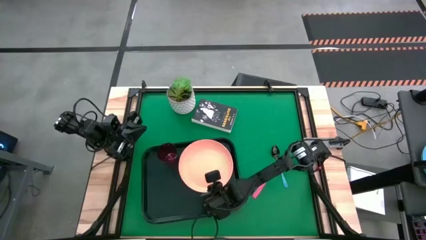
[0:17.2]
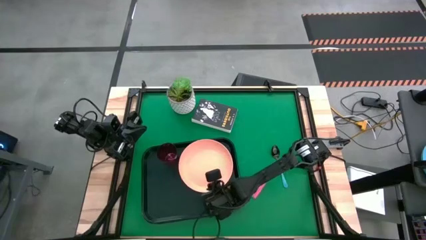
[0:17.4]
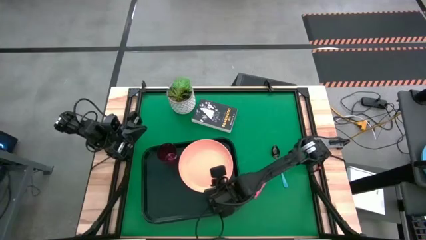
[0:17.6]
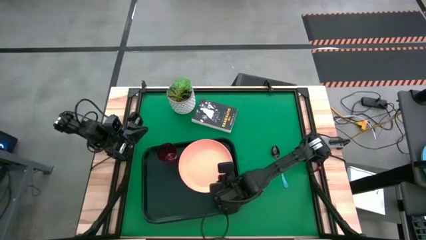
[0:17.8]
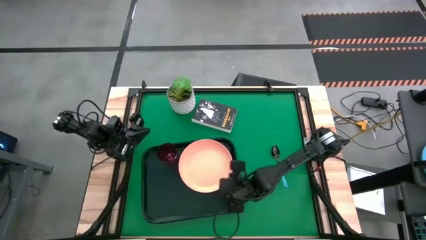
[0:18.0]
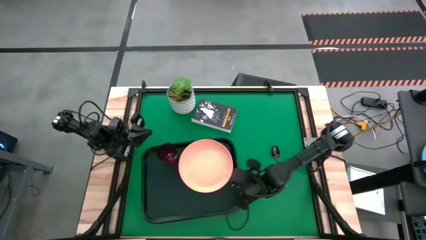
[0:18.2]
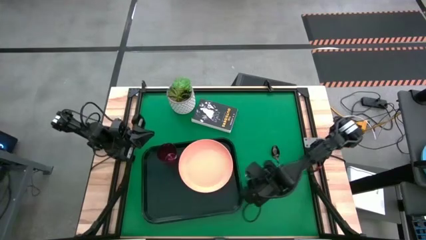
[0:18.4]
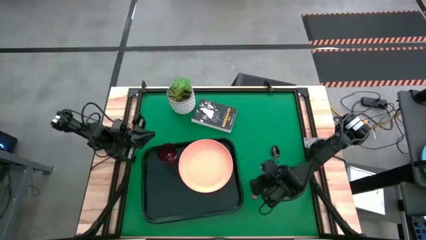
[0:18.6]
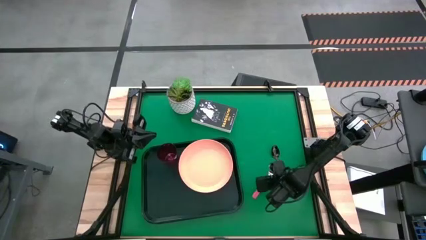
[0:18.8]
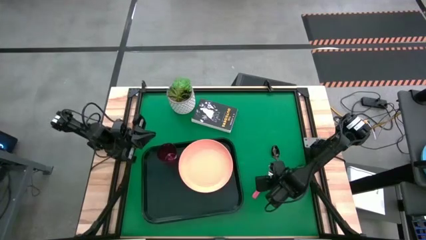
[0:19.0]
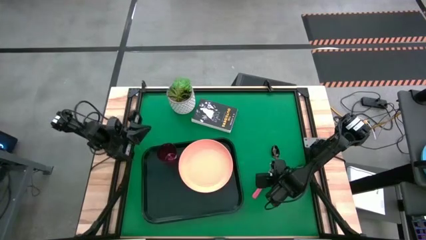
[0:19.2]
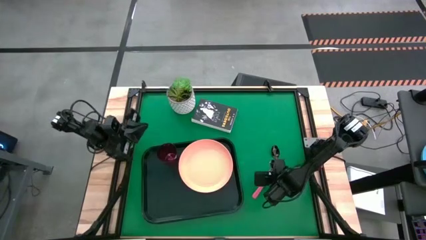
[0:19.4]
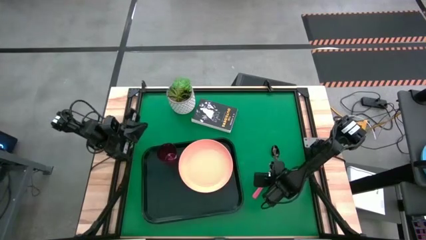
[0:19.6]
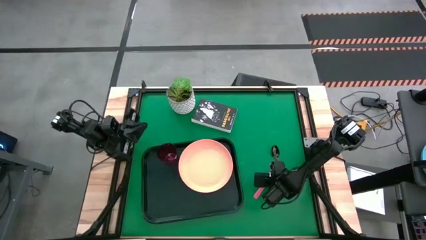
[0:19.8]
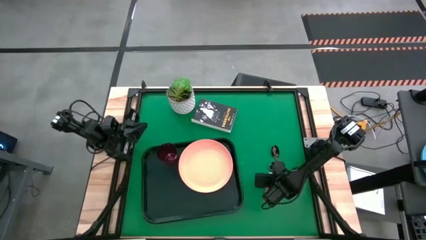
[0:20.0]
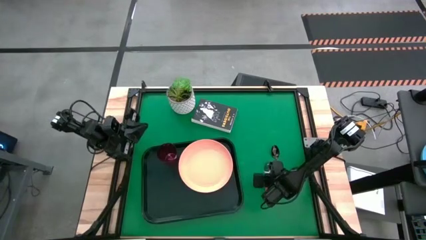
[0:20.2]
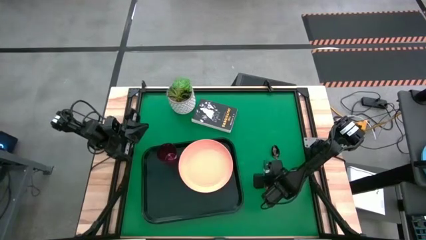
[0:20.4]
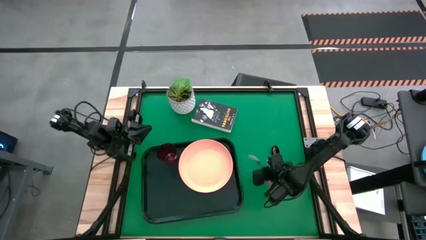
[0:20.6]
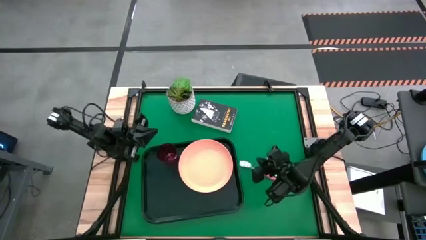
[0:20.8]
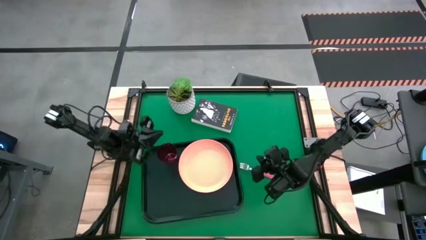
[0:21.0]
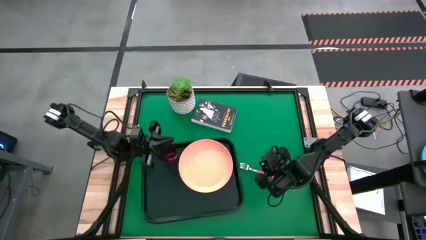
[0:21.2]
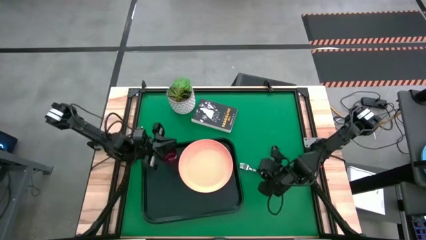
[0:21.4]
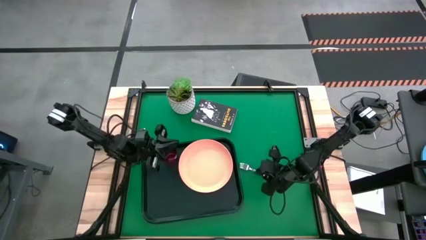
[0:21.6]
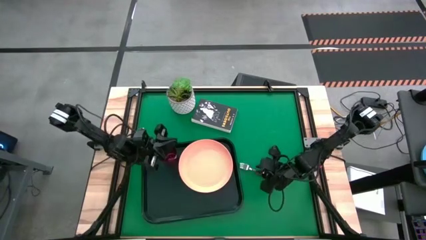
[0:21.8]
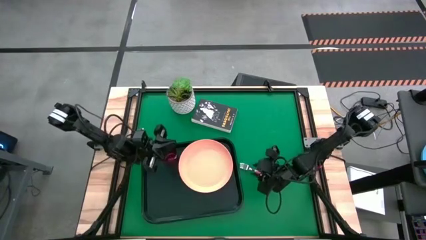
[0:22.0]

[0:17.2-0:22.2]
Task: Pick and place plate/cup/fork/spoon on tray
Put the red fork on the black table tray to the left of the orange plate

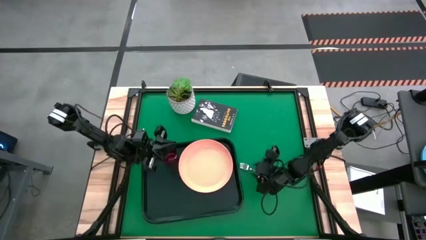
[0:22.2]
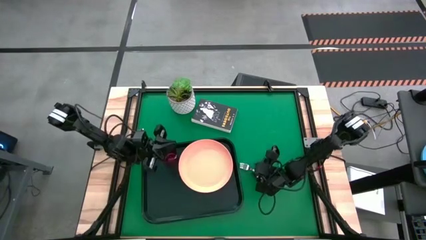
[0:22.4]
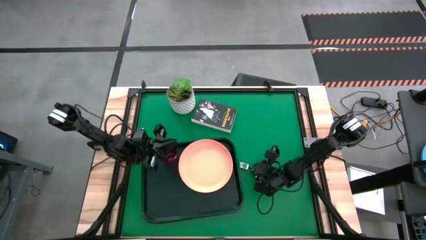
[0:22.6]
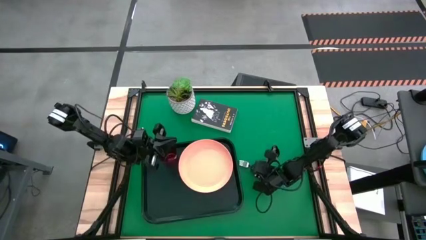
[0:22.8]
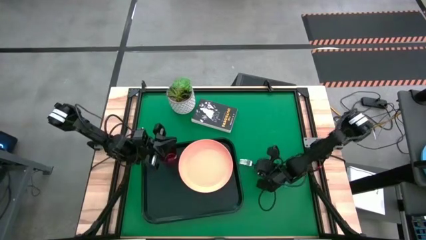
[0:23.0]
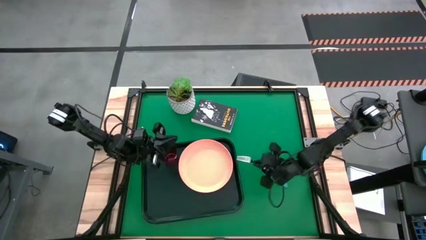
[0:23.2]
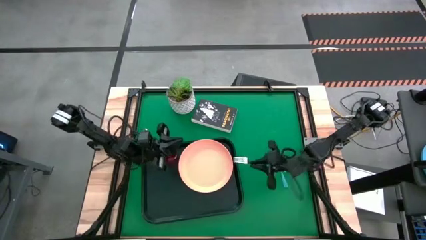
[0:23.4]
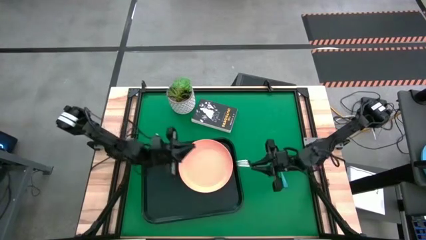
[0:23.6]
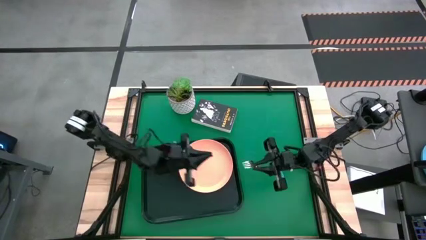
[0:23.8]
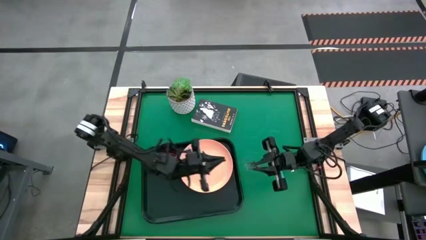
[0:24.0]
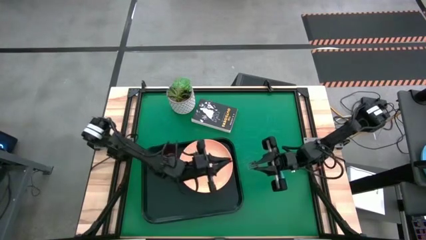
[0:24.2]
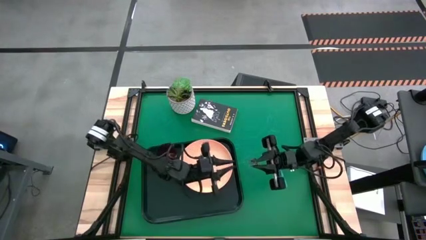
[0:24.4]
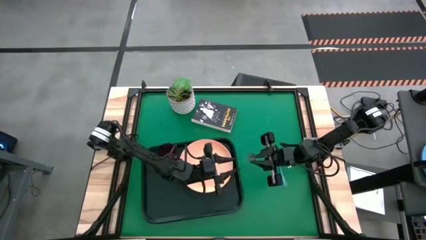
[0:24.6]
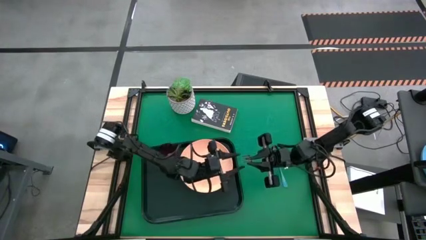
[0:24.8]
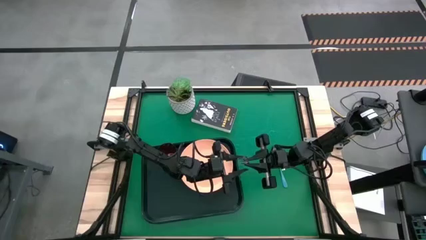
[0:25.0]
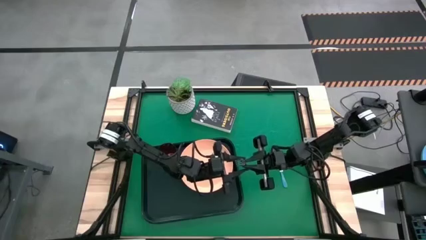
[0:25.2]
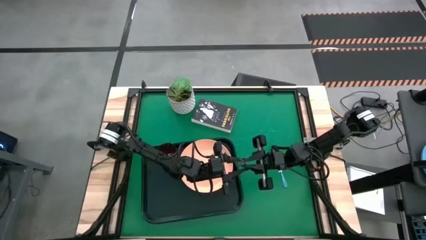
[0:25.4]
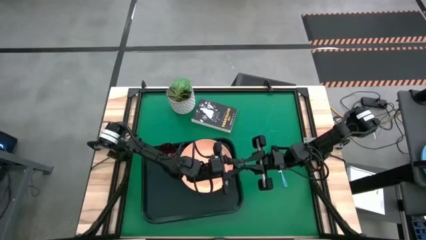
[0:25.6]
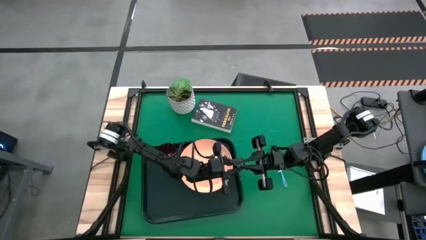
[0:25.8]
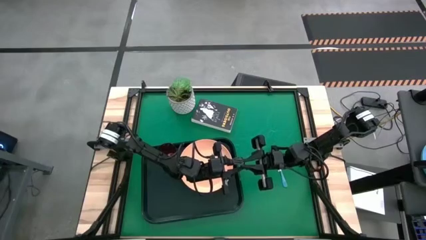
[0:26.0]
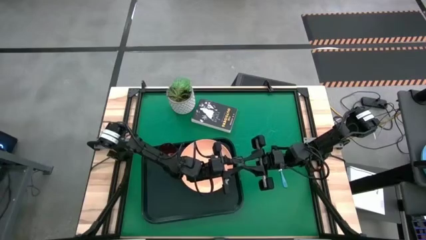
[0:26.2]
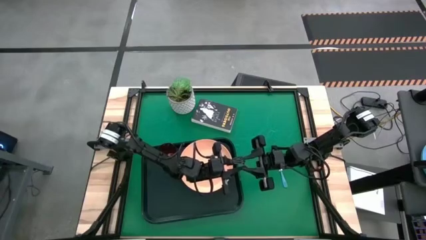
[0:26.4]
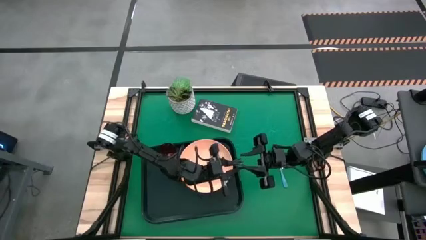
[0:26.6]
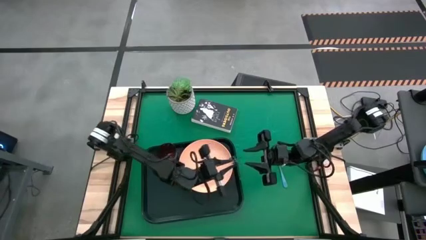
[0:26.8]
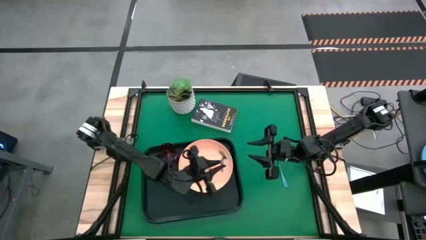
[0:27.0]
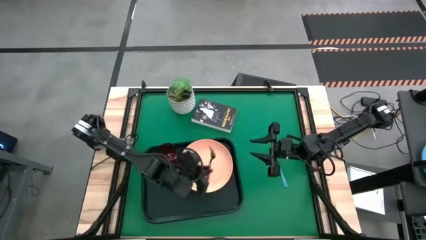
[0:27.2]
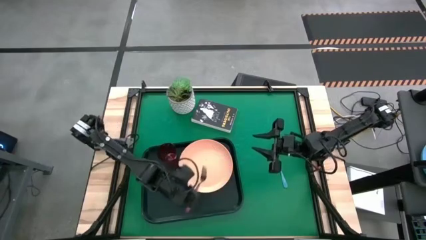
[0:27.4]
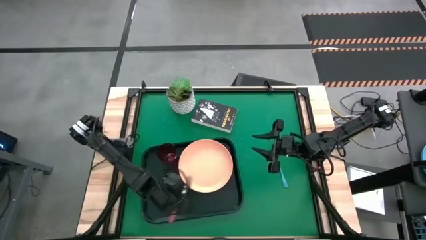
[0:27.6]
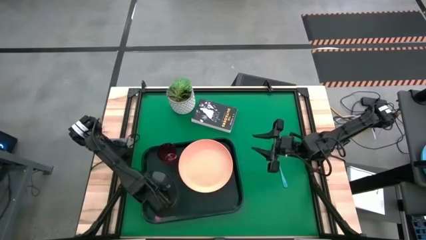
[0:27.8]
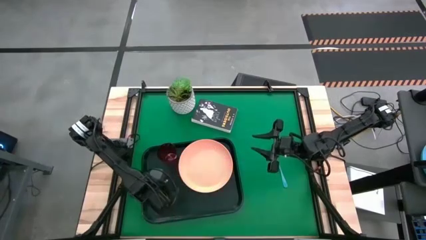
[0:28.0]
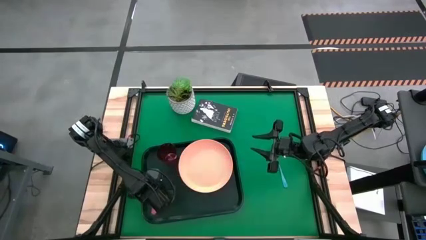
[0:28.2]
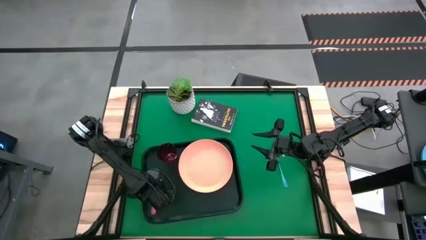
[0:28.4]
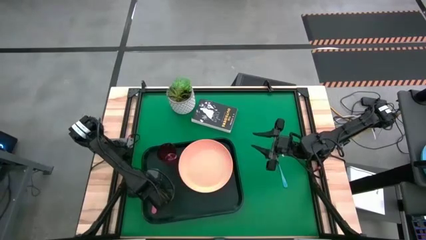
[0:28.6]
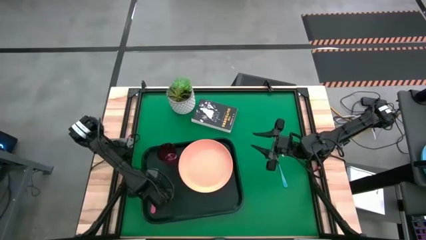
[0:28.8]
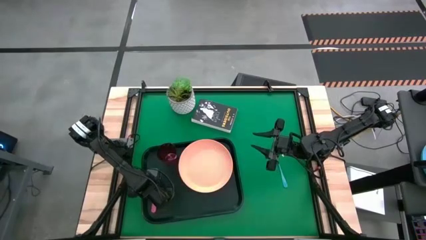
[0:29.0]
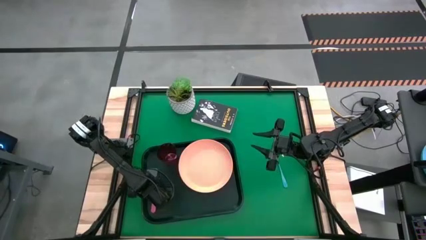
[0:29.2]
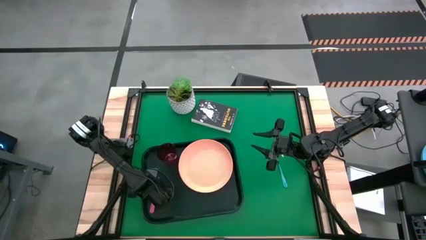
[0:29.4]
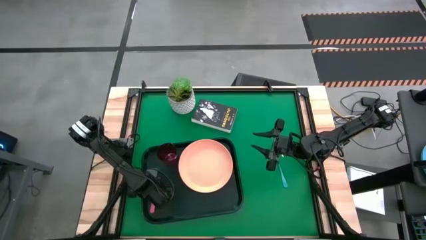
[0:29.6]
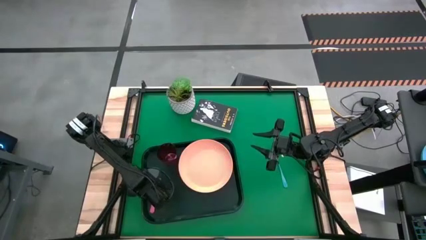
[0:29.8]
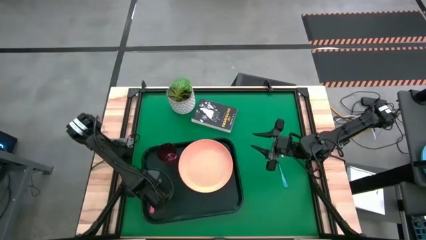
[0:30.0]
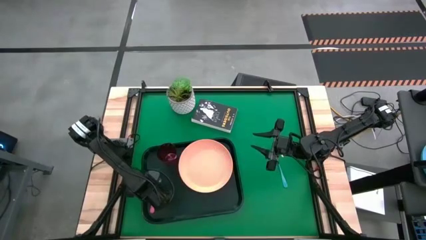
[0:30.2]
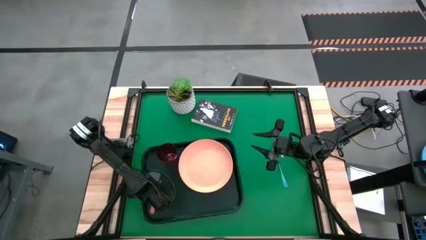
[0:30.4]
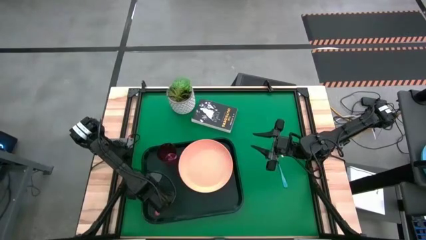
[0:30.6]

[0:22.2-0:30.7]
Put the red fork on the black table tray to the left of the orange plate
